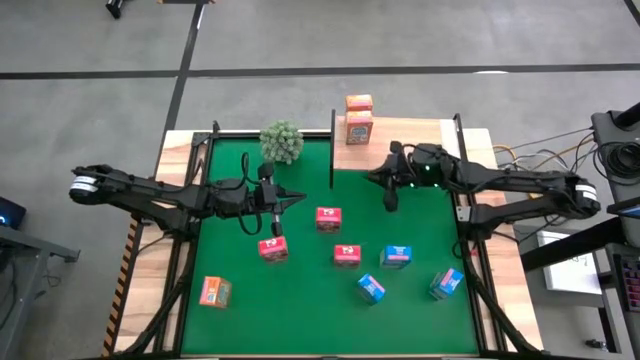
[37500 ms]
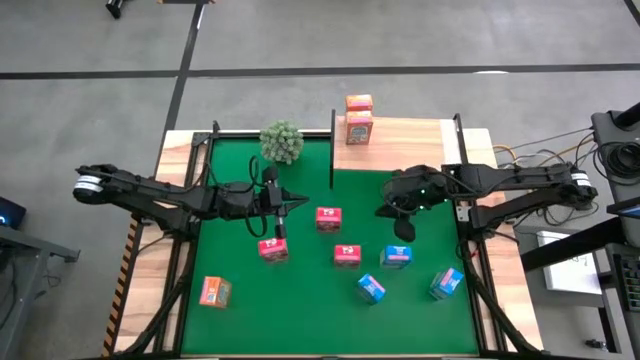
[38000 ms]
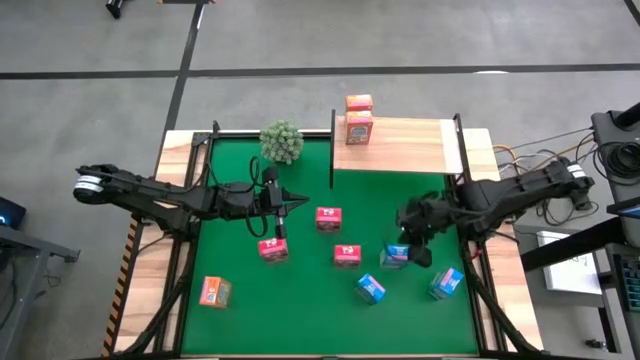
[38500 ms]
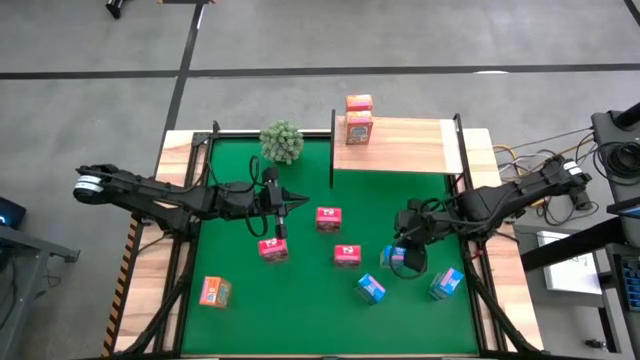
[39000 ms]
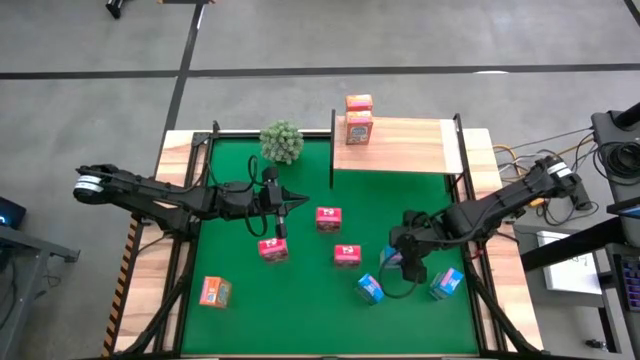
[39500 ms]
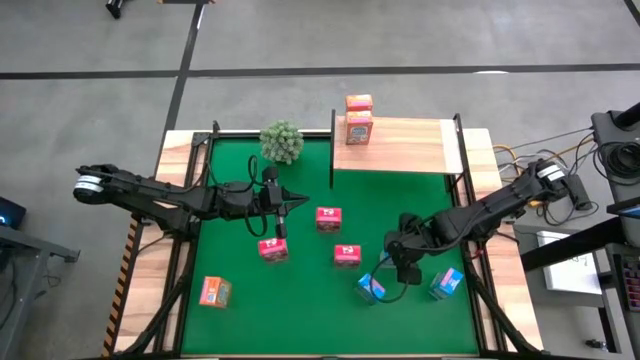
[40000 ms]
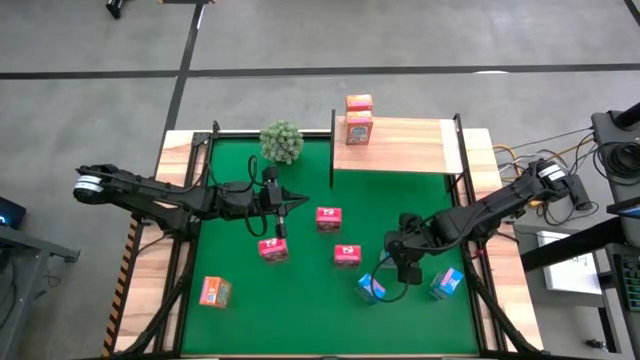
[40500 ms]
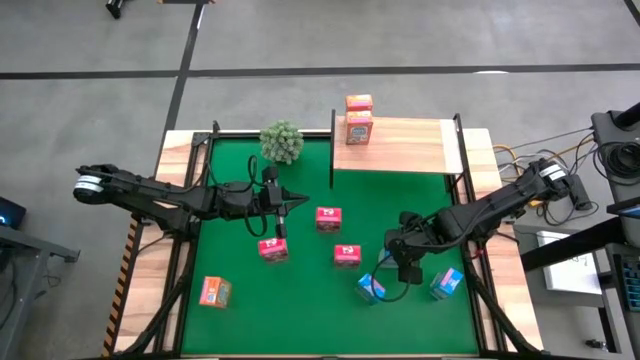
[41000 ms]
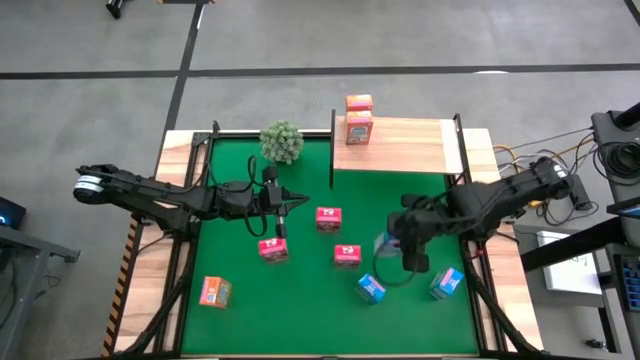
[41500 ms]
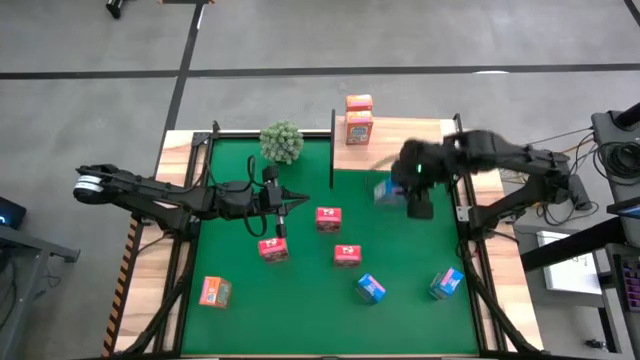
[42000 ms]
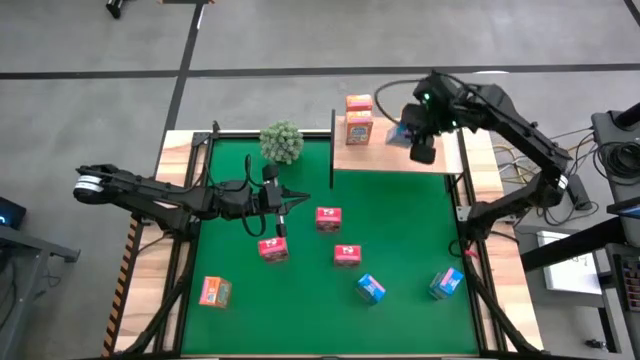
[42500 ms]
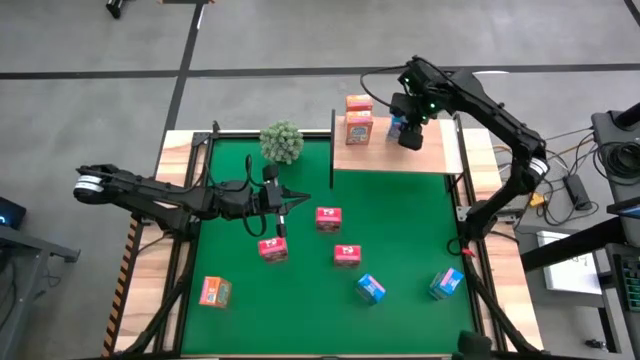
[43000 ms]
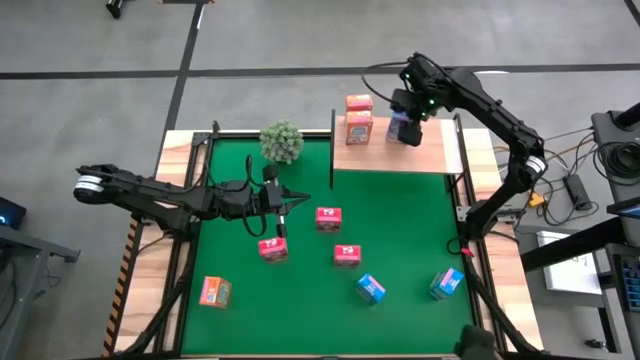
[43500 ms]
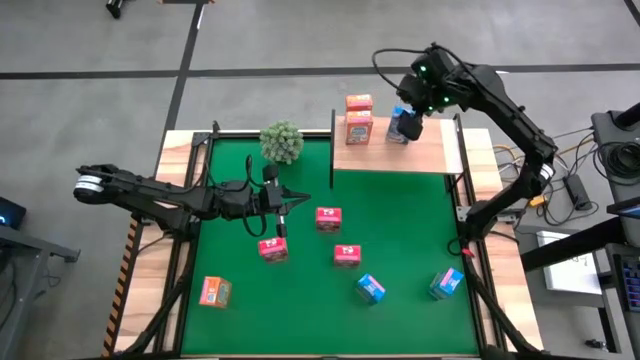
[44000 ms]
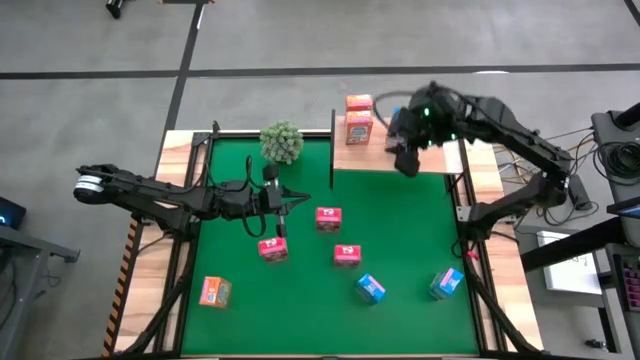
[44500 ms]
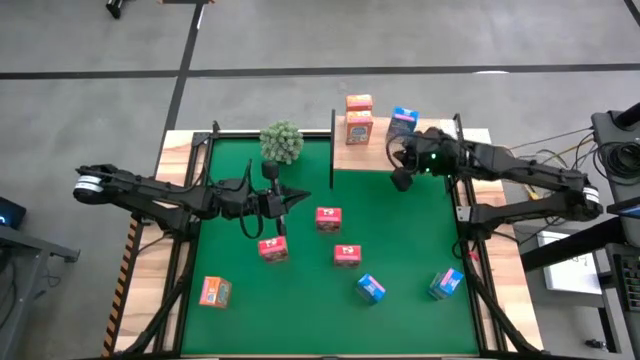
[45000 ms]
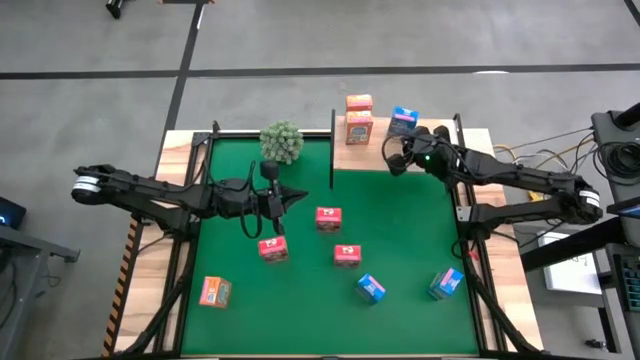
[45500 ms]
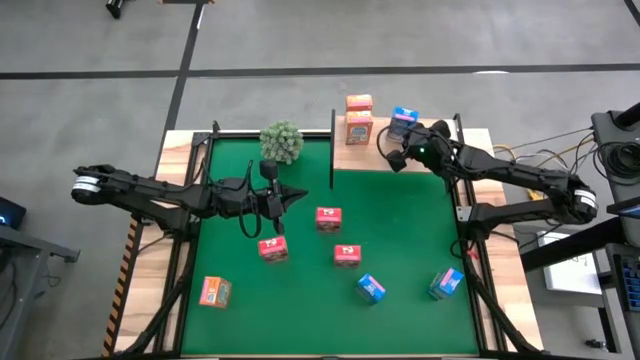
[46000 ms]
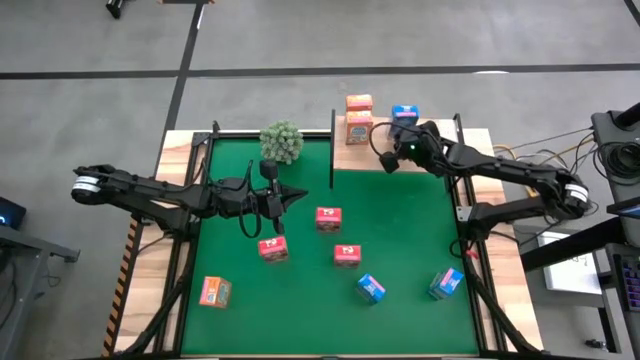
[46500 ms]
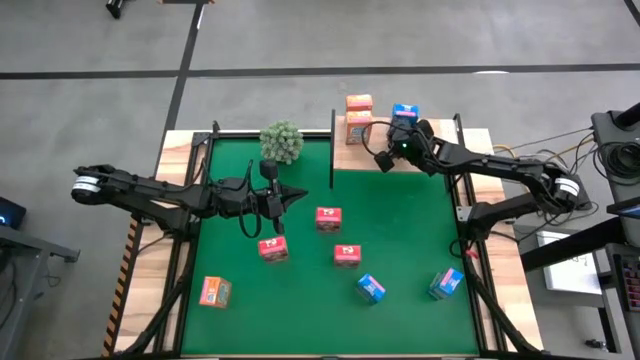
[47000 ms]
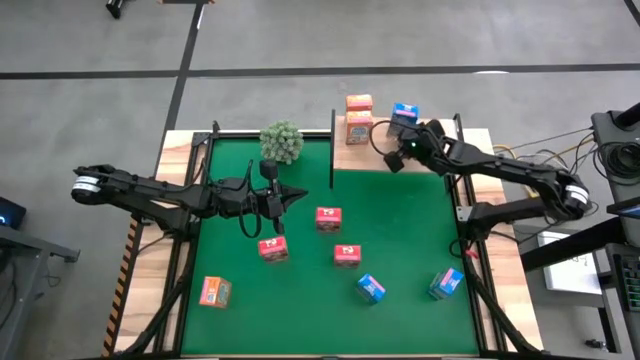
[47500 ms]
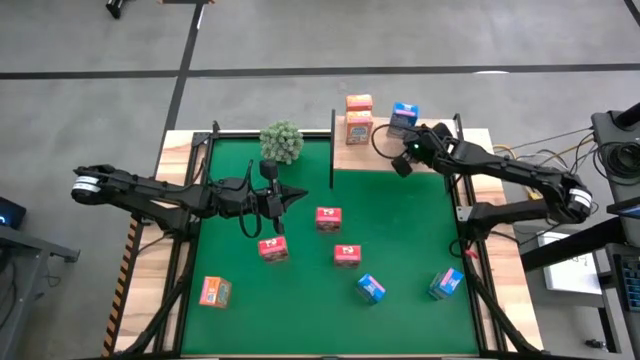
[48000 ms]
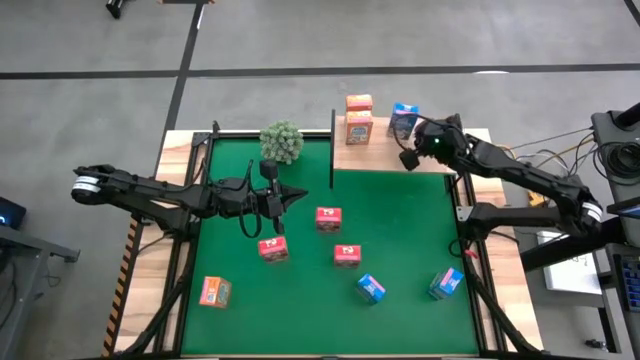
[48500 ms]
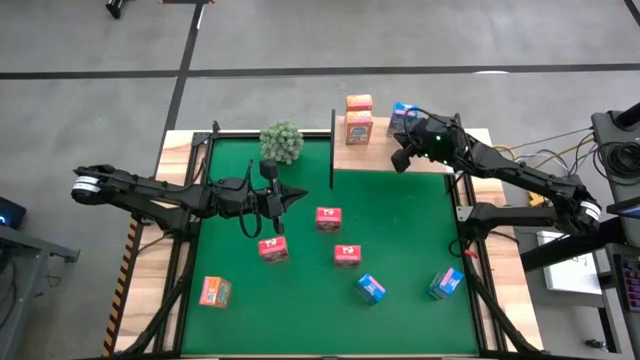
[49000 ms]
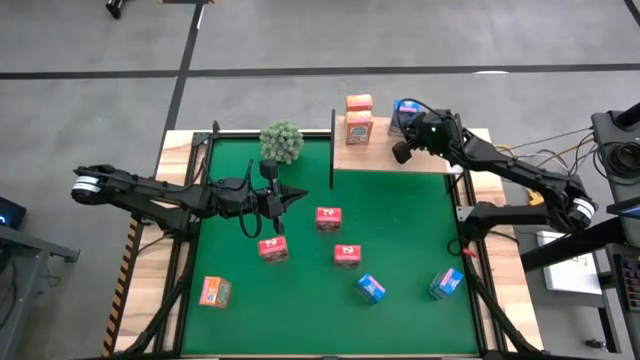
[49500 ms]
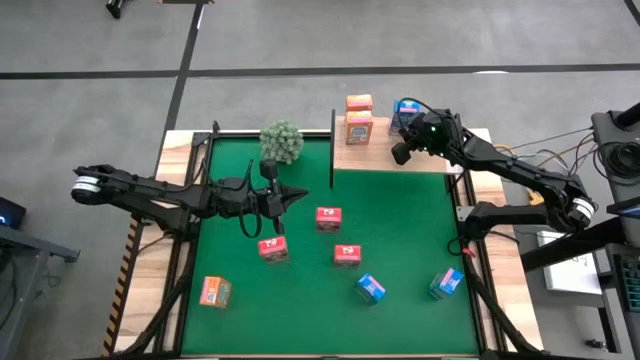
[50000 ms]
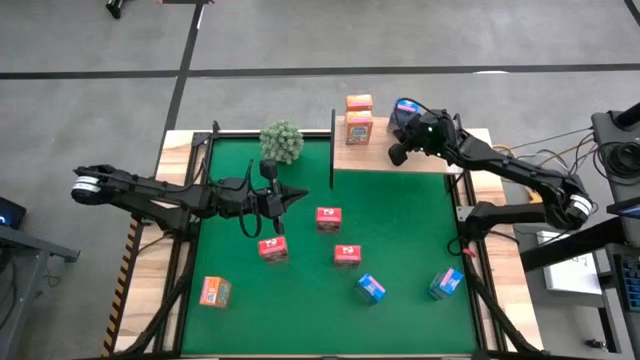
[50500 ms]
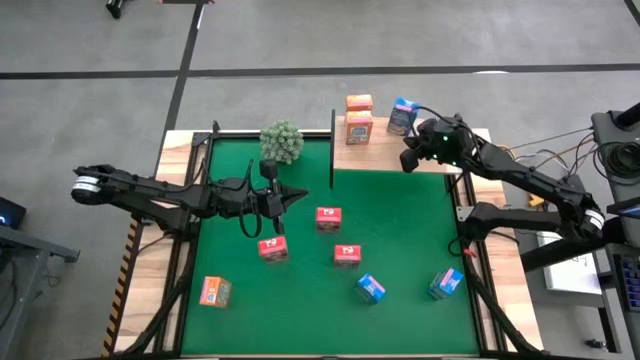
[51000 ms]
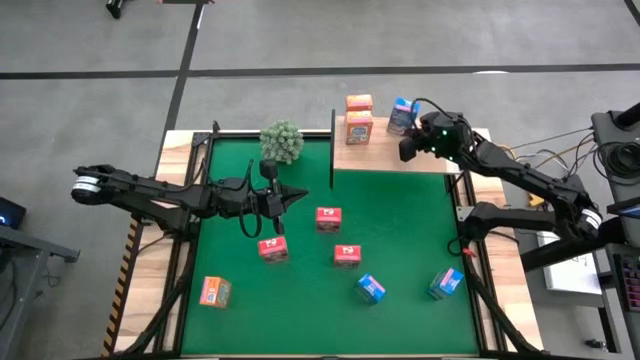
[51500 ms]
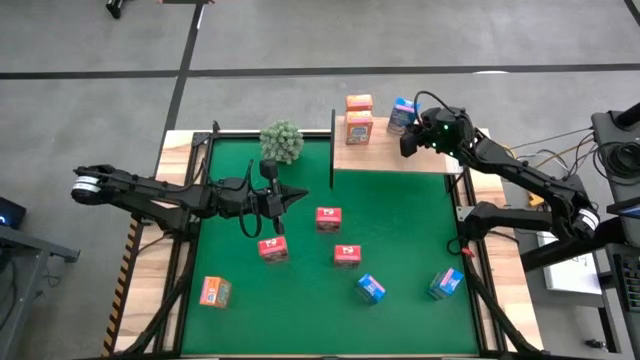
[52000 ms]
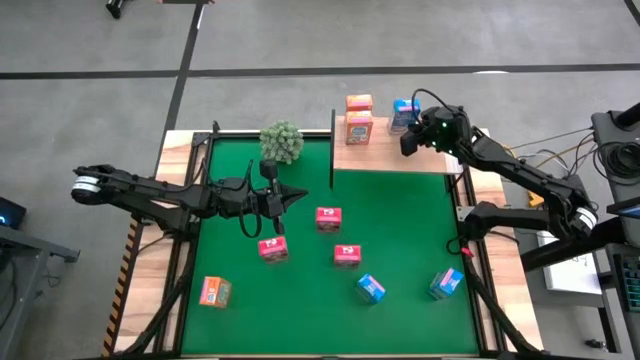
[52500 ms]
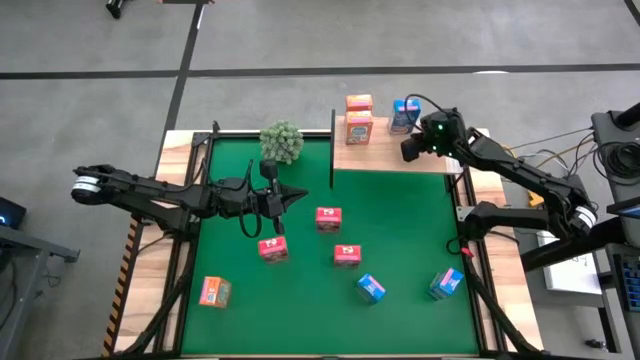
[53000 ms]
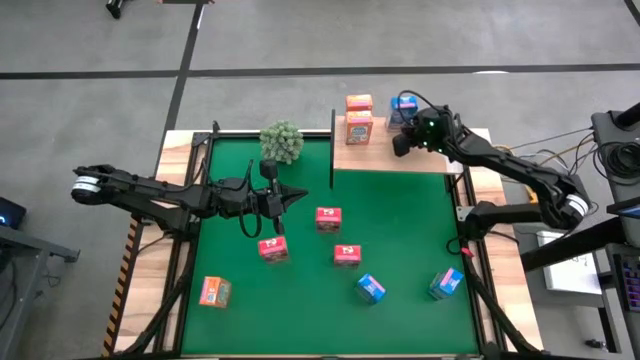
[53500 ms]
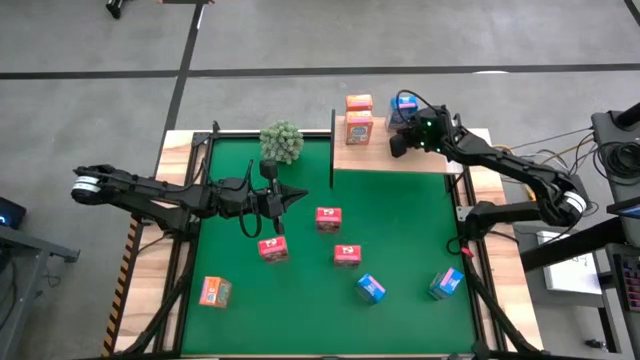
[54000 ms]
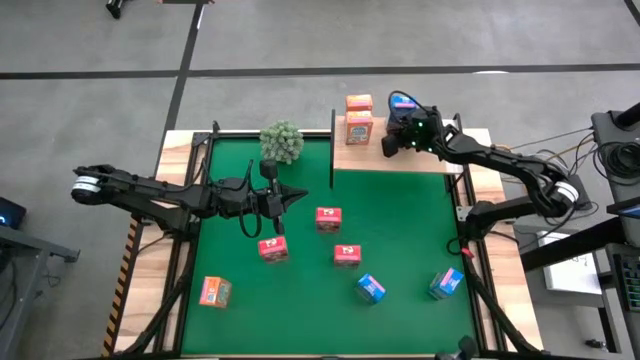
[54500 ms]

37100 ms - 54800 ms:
Task: Stack cereal on shelf
Put the top left blue cereal box on the shelf

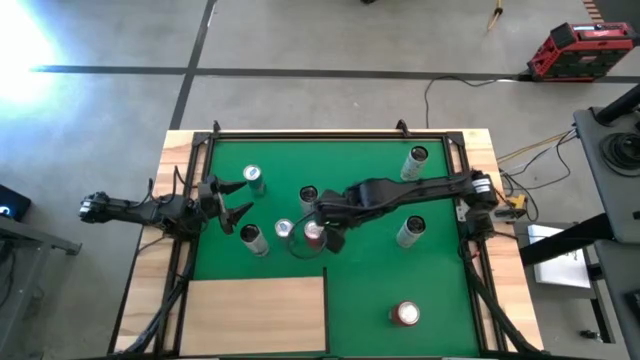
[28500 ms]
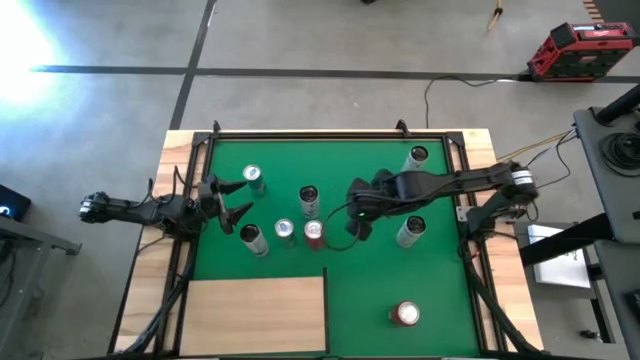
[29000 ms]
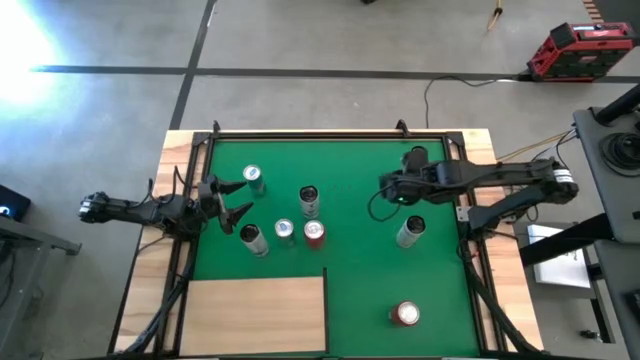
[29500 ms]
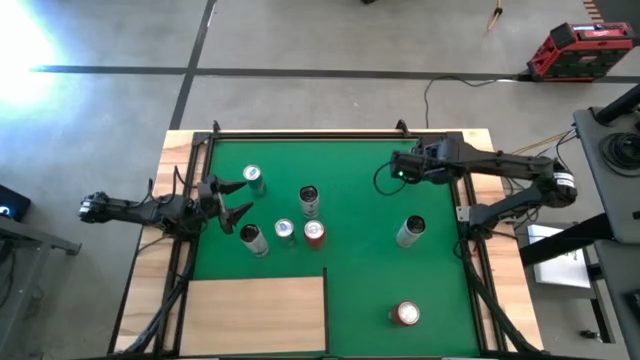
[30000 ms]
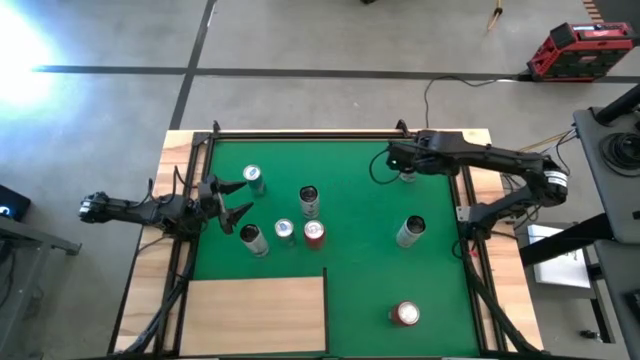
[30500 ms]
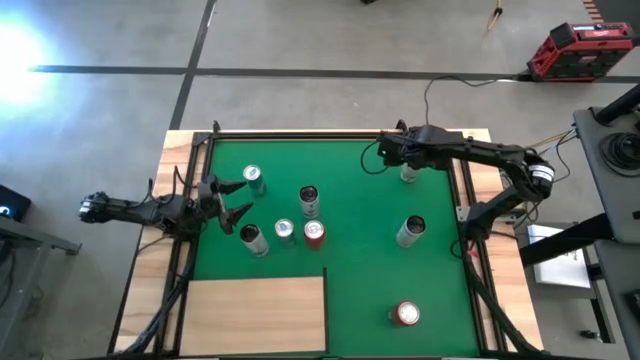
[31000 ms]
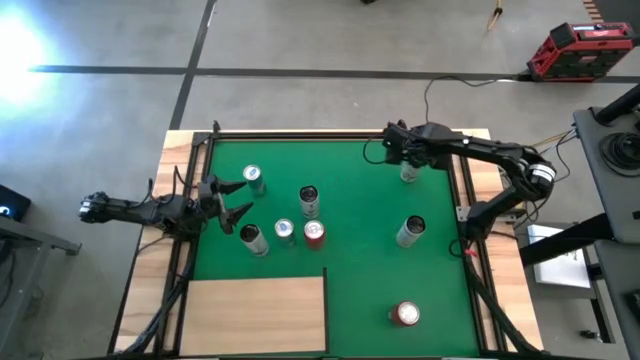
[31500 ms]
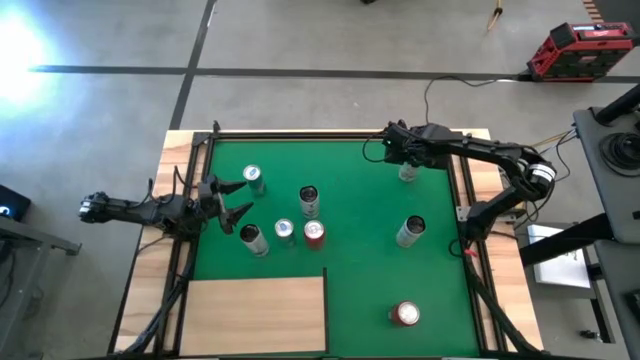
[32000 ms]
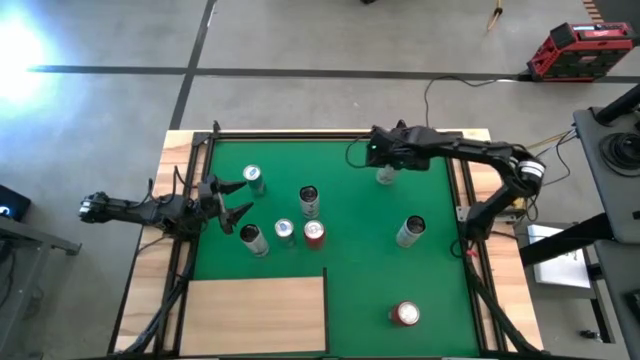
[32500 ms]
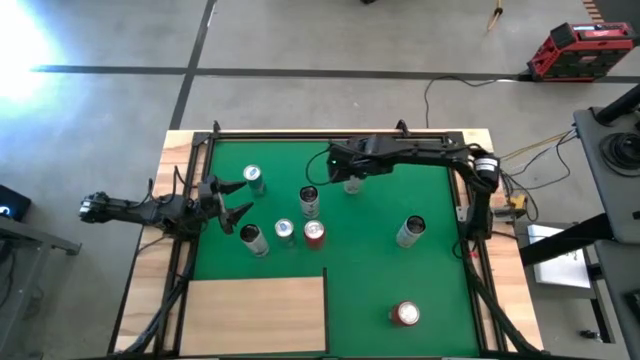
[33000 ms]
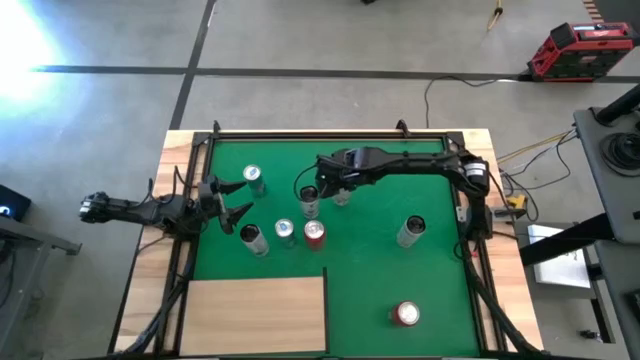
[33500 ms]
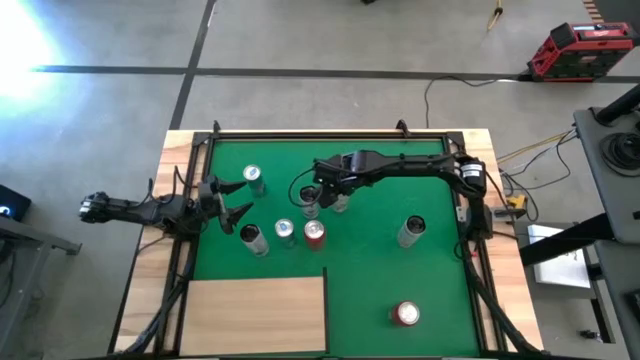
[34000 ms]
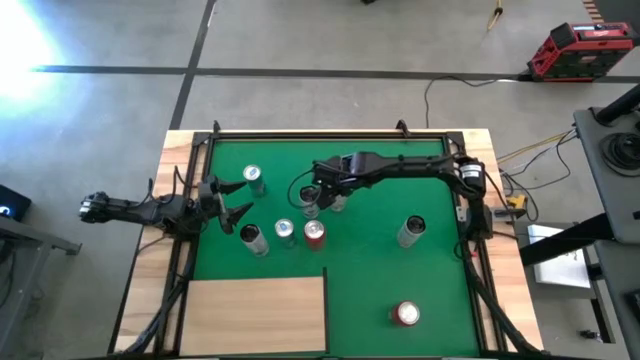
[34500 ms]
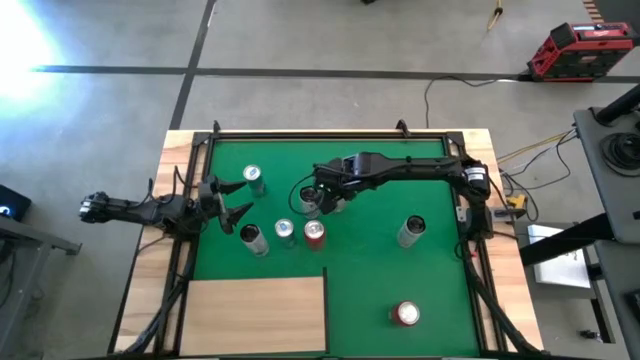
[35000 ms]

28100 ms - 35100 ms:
Task: Place canned beverage on shelf
Move the top white and yellow soda can to the center of the table
